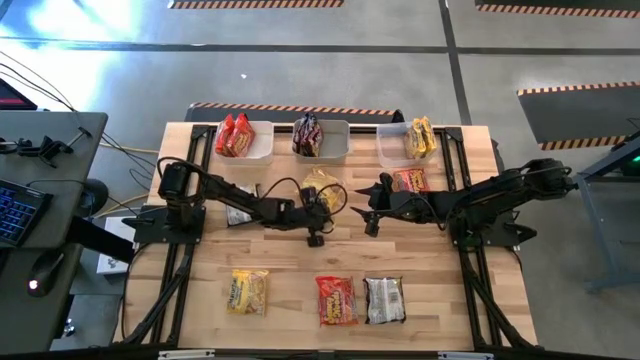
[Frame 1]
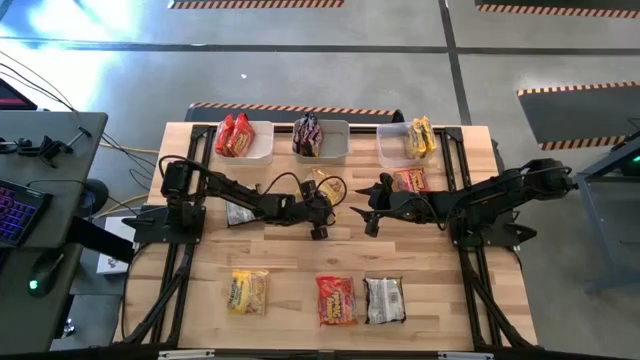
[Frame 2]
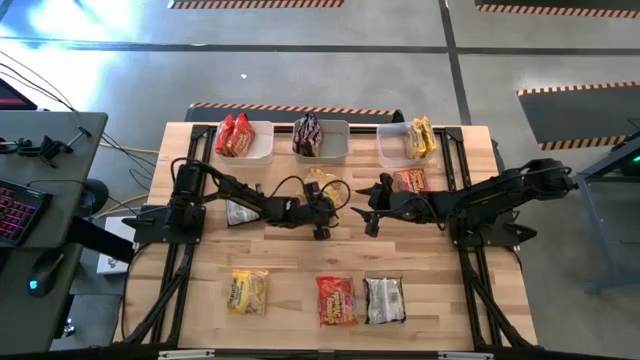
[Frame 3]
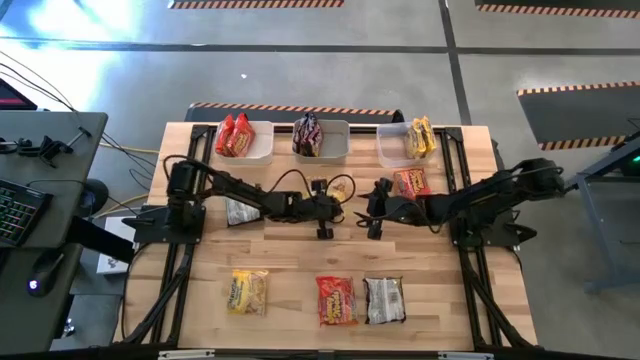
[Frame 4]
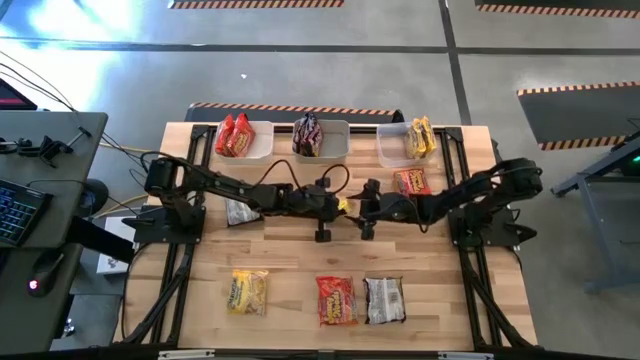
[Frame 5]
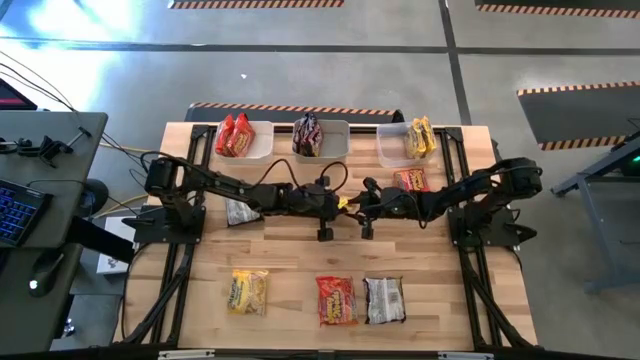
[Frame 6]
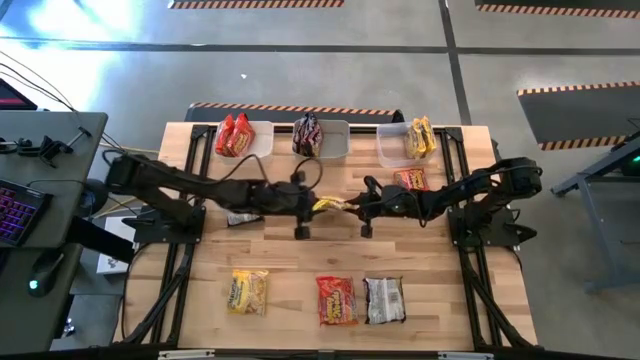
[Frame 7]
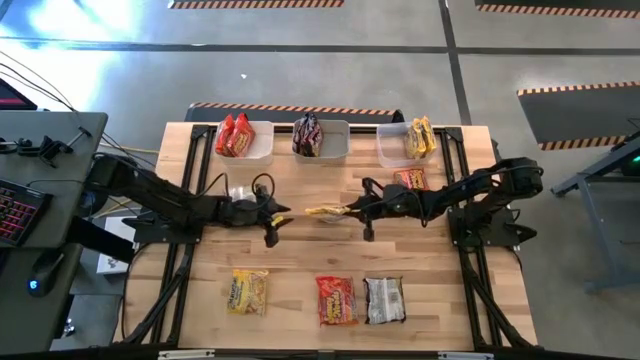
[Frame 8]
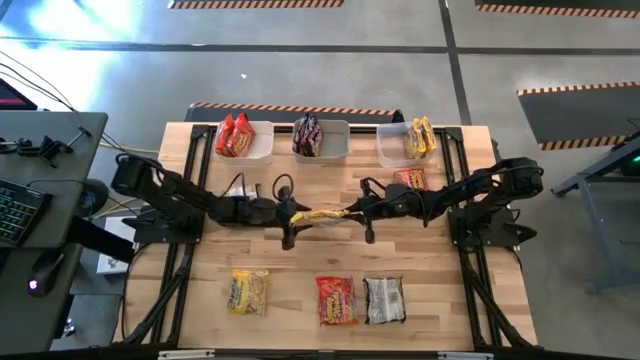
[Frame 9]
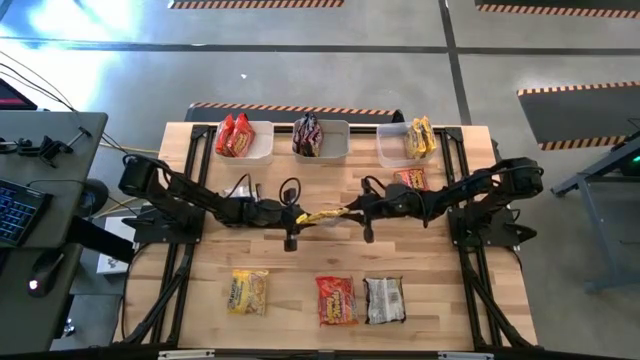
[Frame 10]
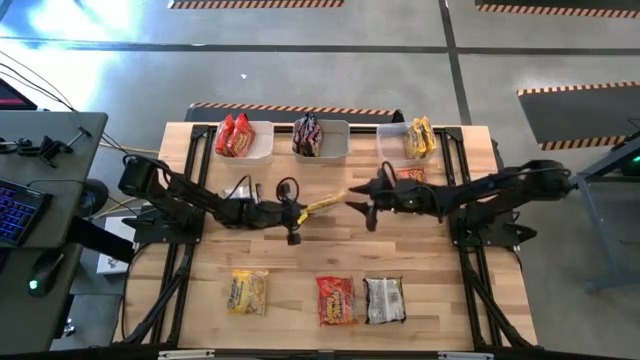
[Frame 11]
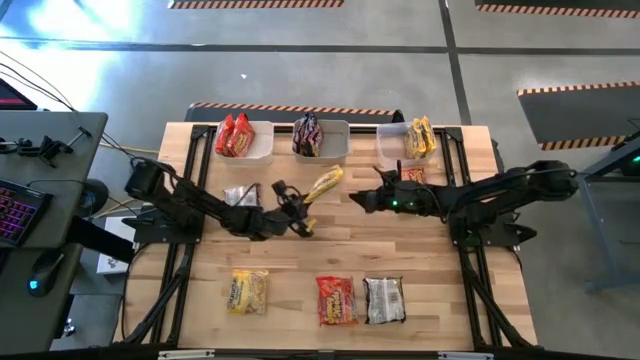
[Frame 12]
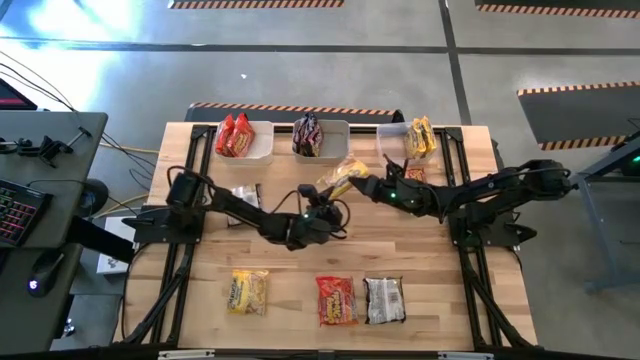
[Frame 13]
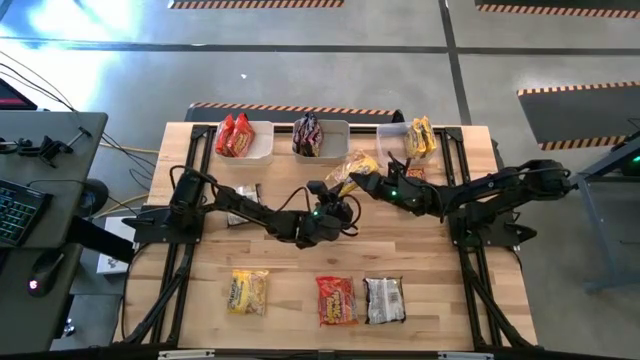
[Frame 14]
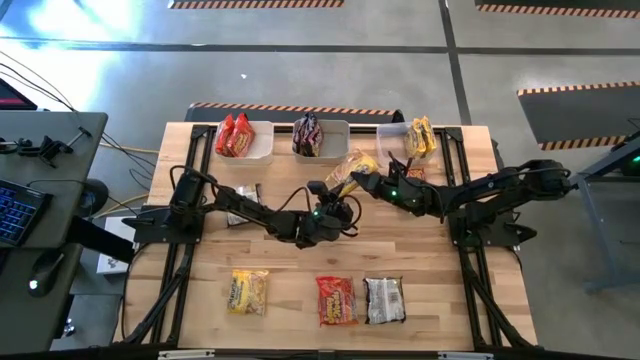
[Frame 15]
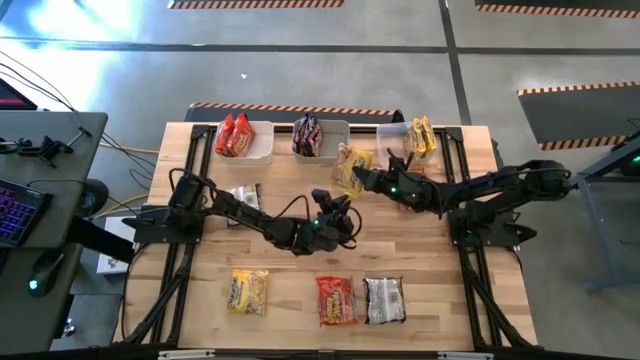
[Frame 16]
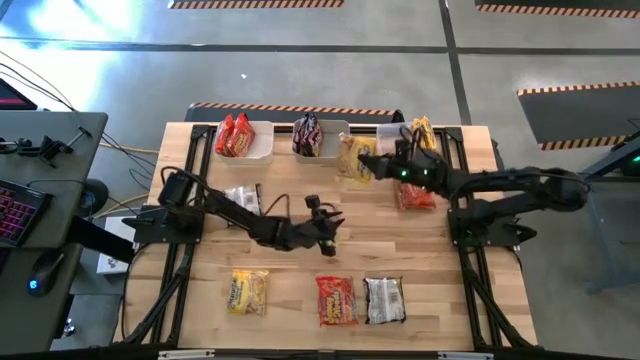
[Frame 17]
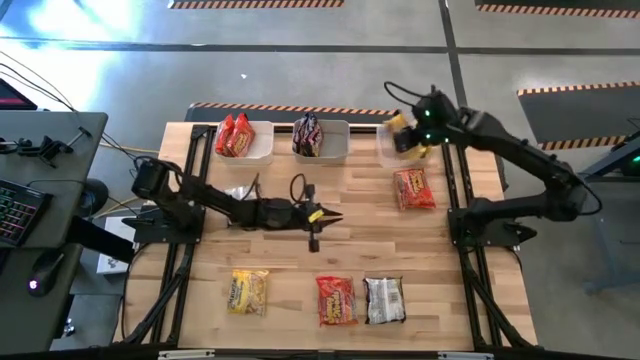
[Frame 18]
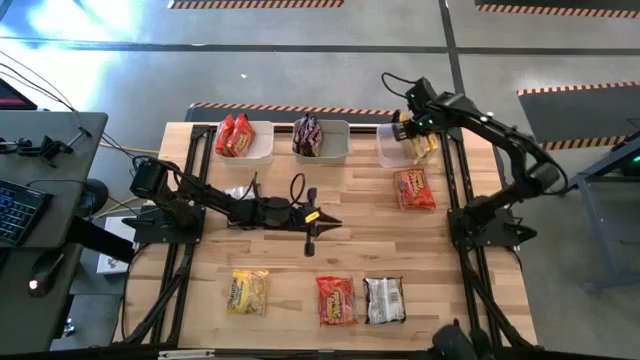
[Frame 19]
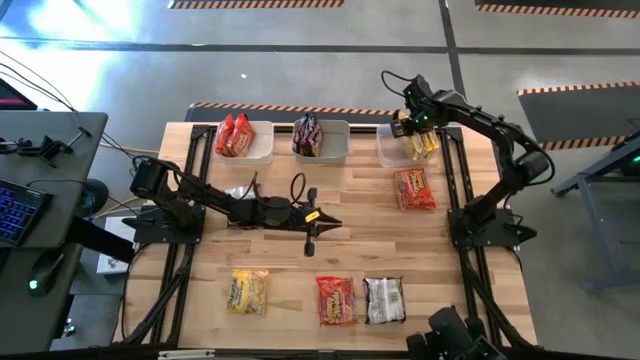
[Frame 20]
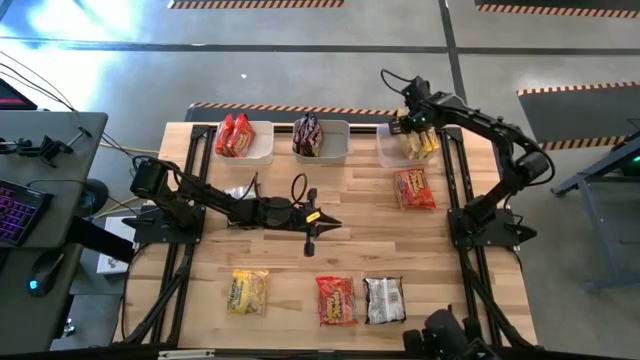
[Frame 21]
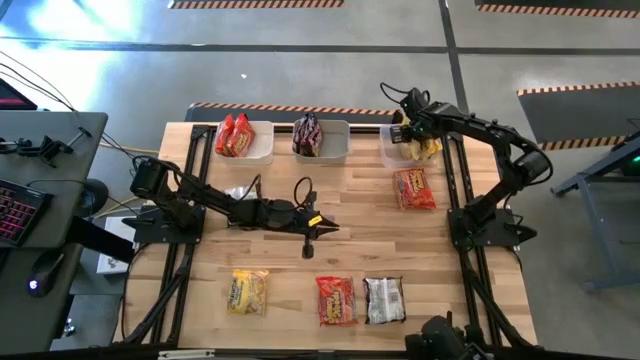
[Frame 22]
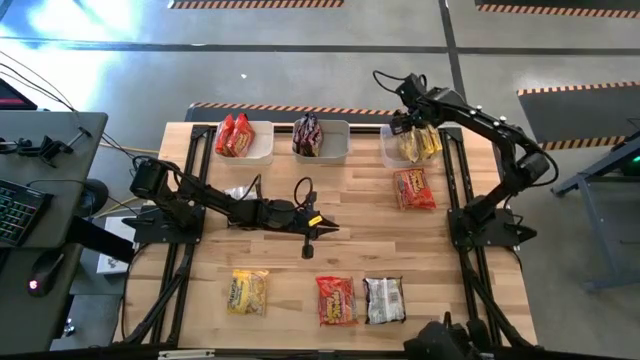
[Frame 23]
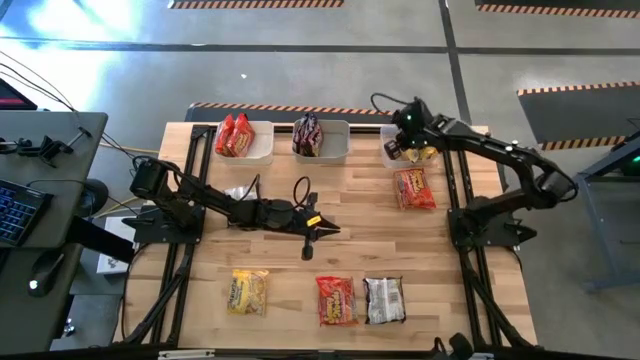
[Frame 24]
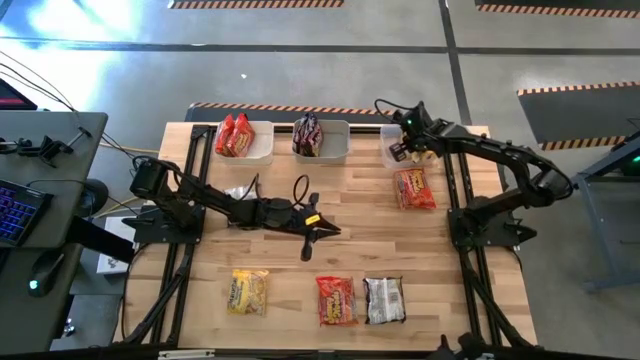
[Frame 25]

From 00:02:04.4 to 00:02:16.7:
Task: Sort Maruchan noodles
Put the yellow noodle pack into the transparent bin

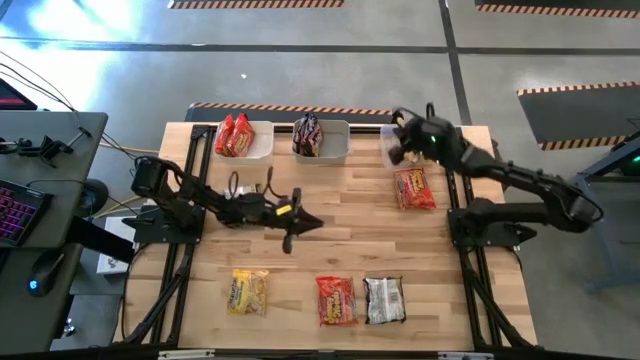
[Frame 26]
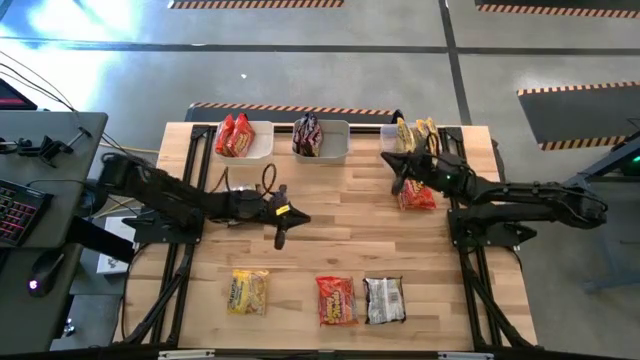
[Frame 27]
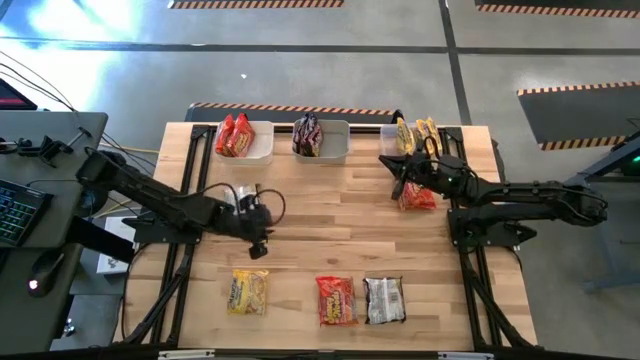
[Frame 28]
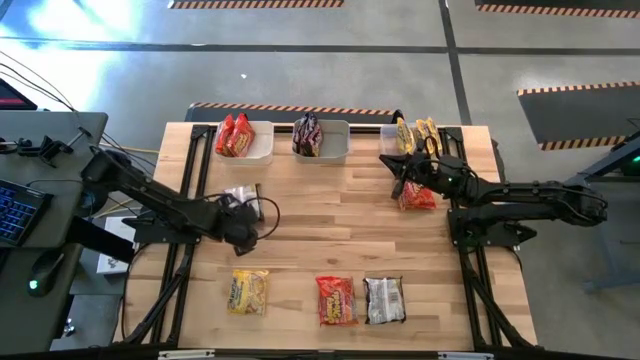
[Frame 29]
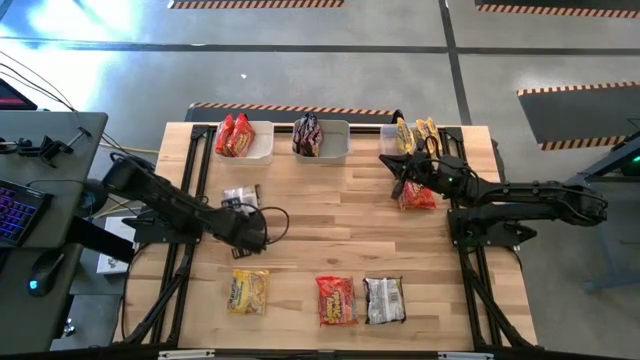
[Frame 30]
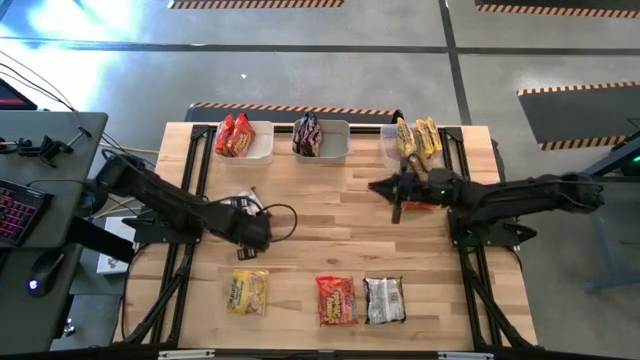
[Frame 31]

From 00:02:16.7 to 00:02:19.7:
Put the black noodle pack into the gray bin

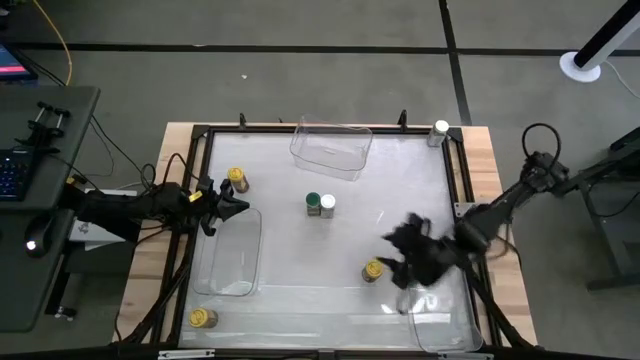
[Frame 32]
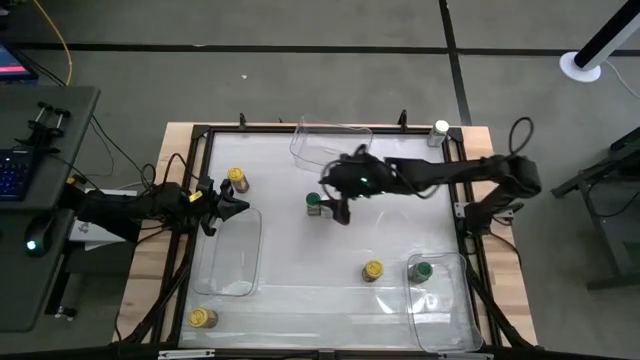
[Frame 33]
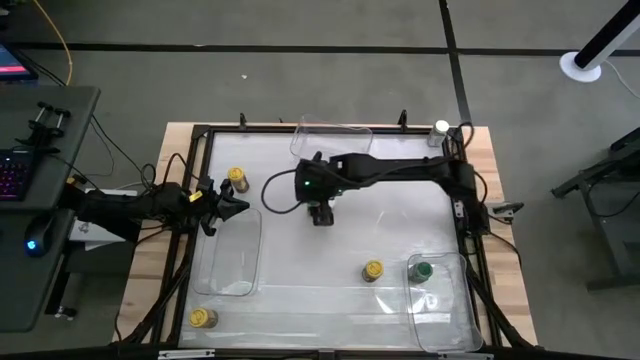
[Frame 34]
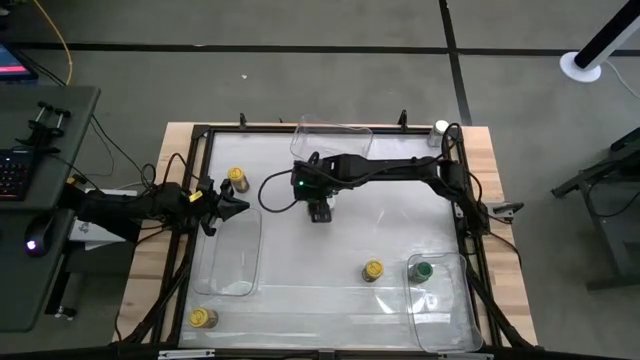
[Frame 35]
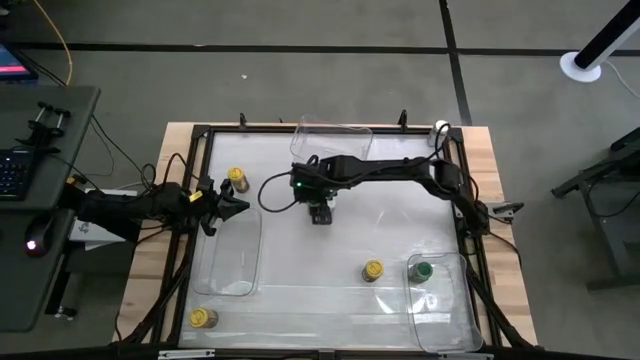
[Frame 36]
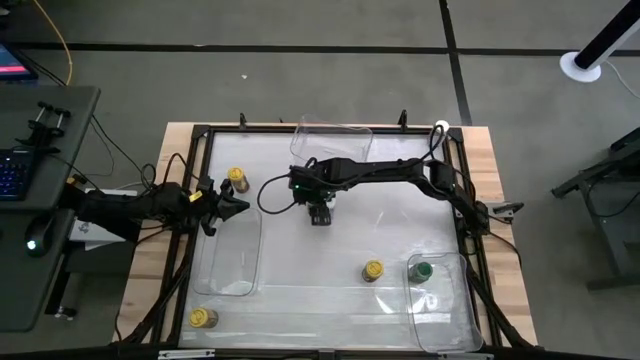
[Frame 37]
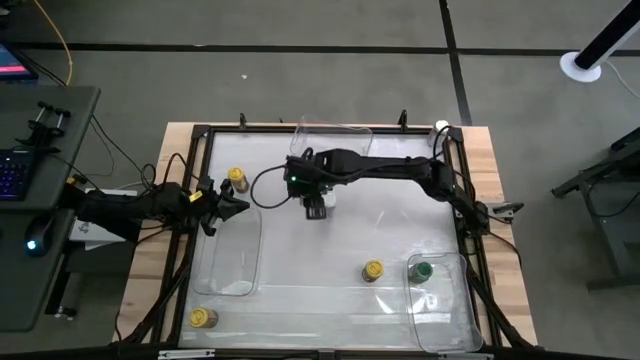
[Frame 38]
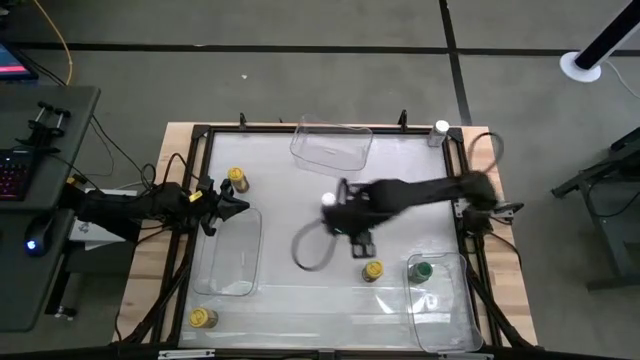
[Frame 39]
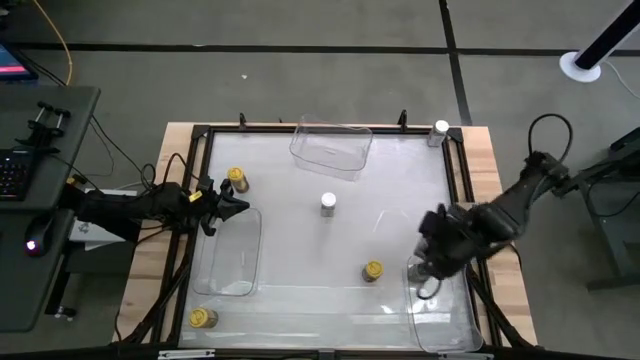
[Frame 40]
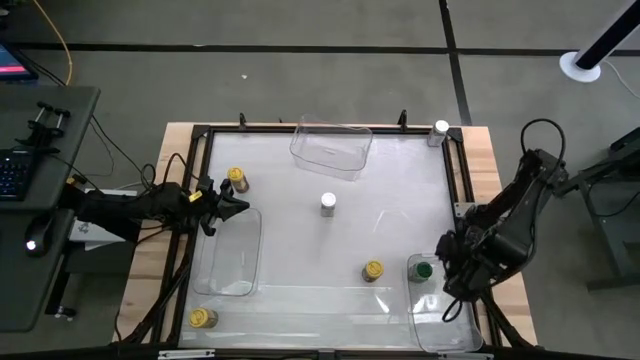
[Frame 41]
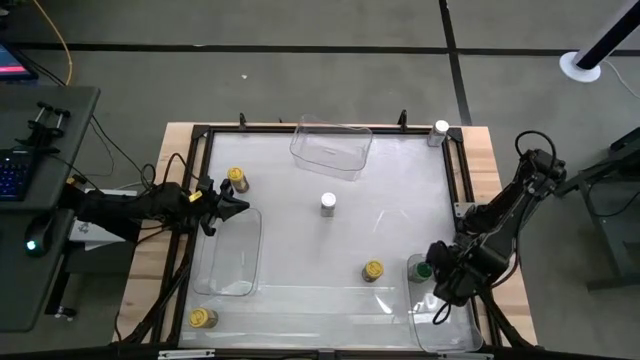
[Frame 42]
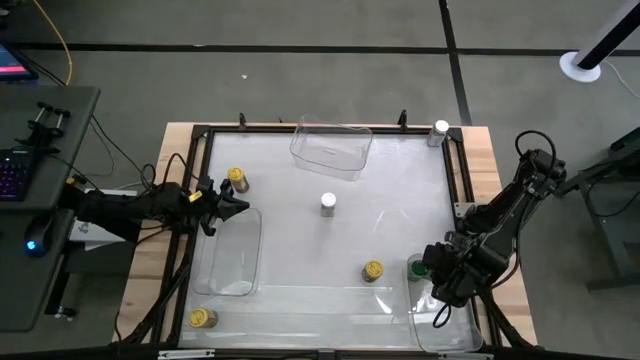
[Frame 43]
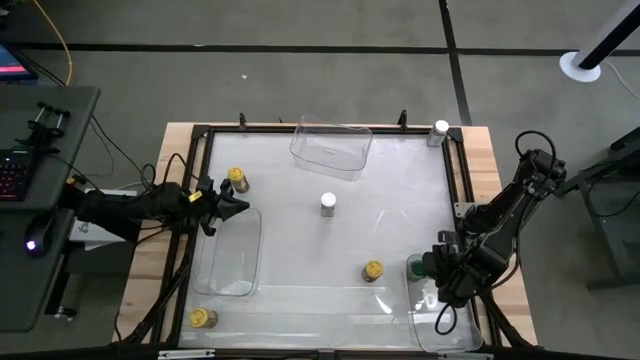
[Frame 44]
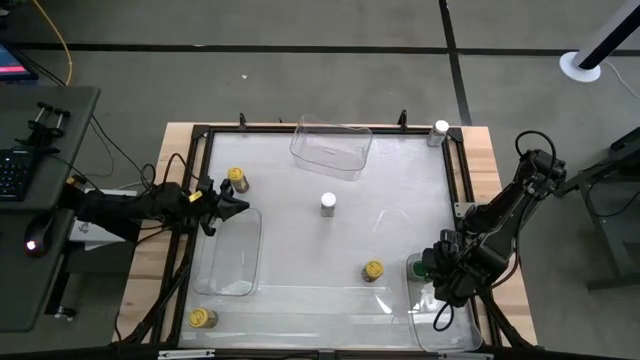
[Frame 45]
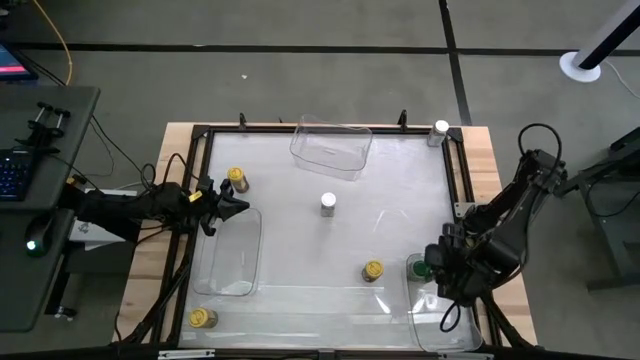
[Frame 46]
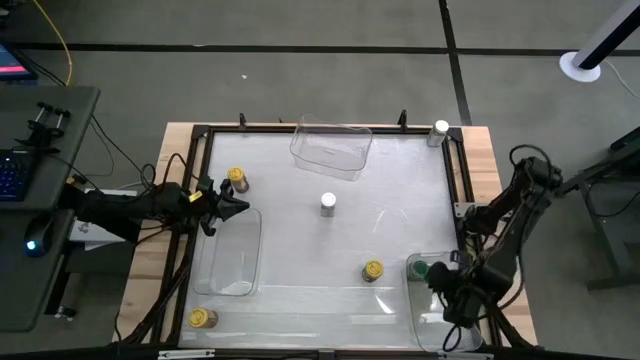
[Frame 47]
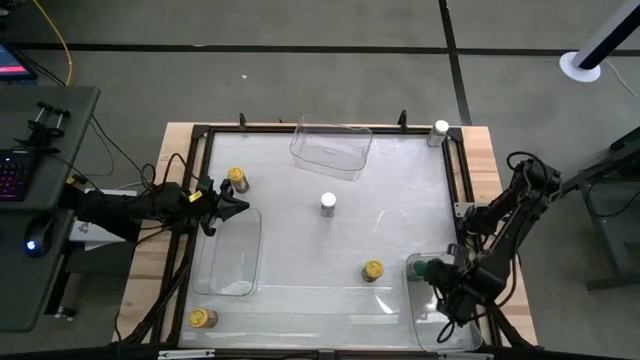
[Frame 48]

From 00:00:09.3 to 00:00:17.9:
Task: Sort spices by type
Put the green seasoning bottle into the right transparent bin
